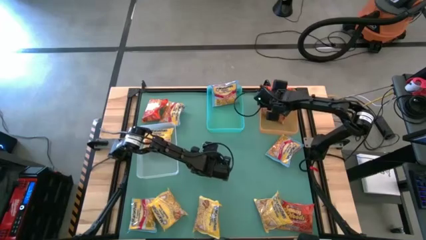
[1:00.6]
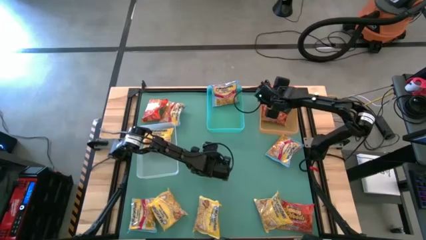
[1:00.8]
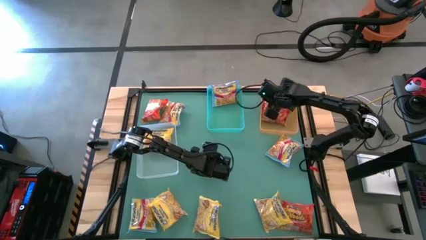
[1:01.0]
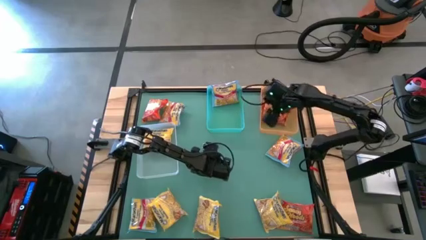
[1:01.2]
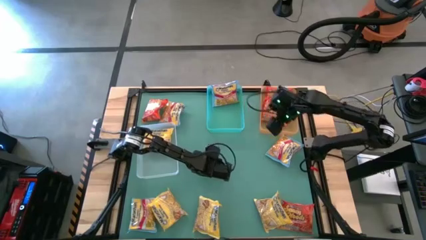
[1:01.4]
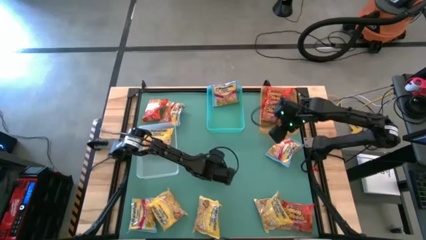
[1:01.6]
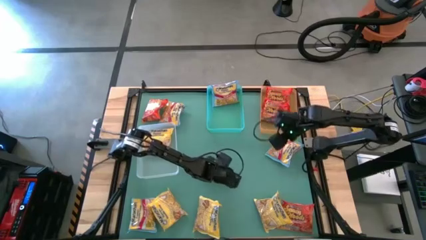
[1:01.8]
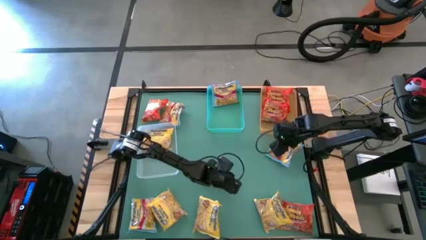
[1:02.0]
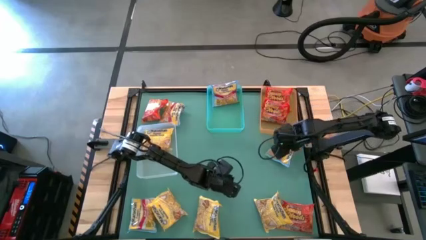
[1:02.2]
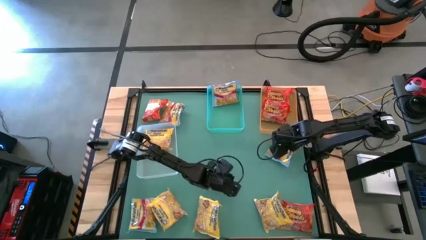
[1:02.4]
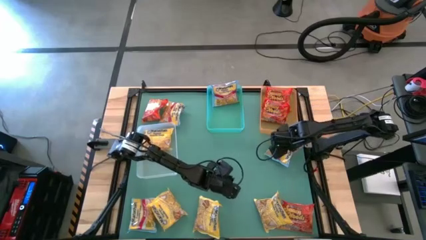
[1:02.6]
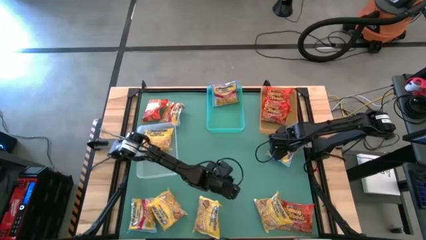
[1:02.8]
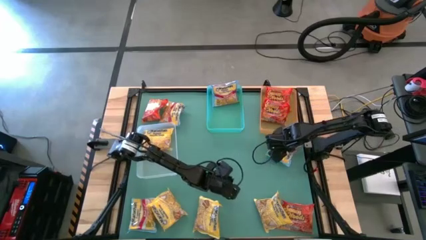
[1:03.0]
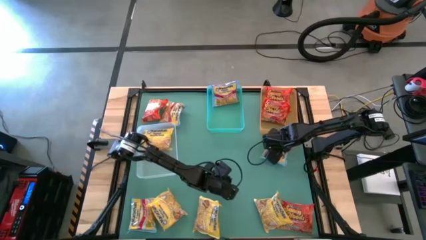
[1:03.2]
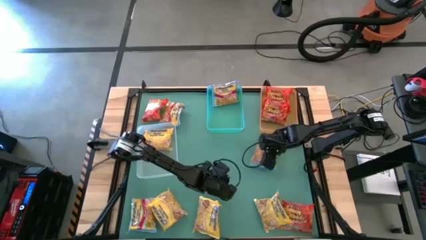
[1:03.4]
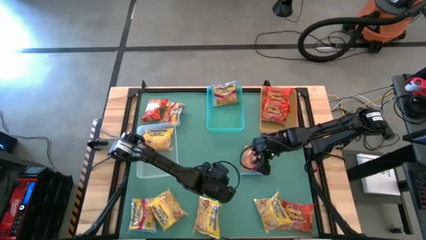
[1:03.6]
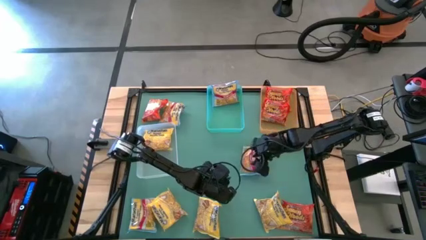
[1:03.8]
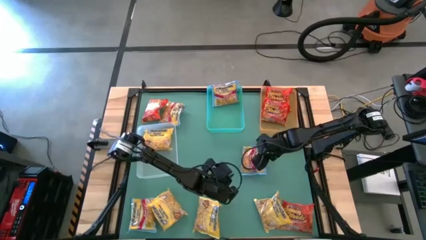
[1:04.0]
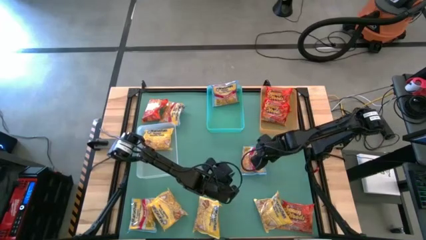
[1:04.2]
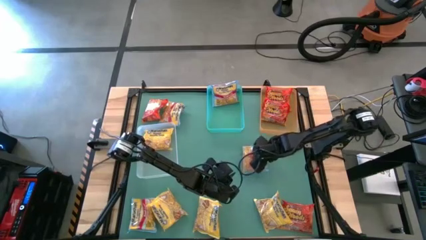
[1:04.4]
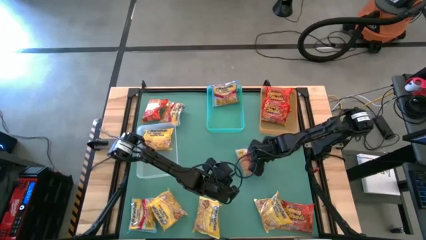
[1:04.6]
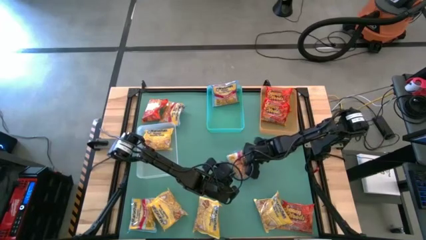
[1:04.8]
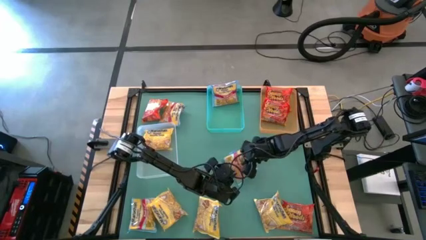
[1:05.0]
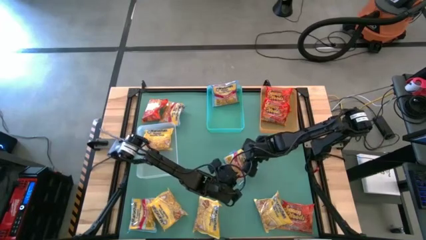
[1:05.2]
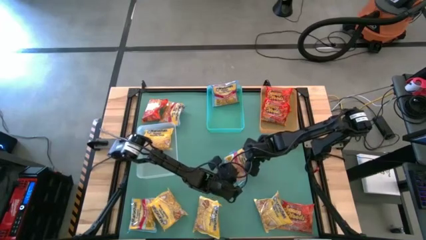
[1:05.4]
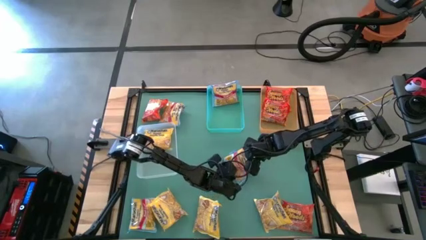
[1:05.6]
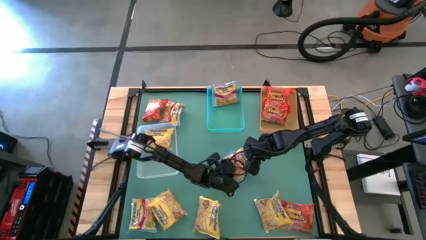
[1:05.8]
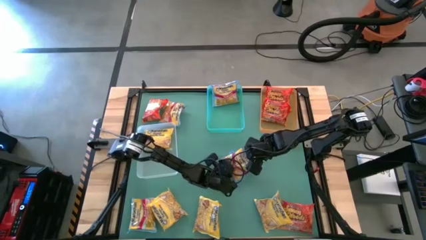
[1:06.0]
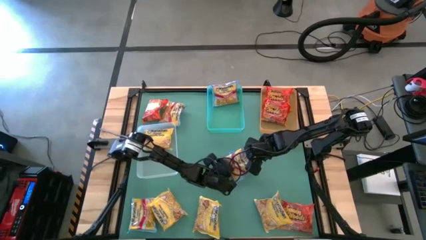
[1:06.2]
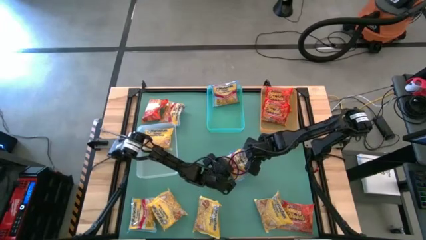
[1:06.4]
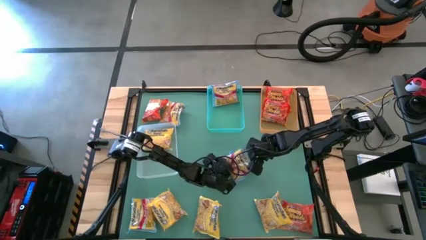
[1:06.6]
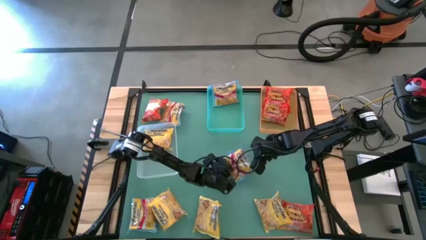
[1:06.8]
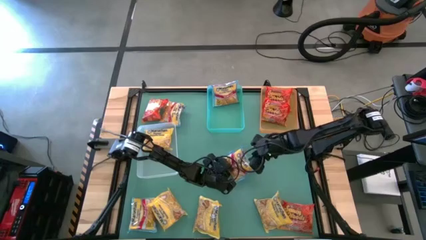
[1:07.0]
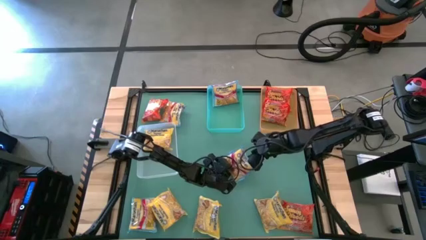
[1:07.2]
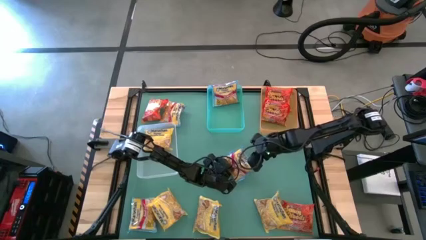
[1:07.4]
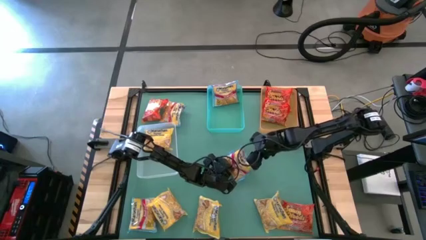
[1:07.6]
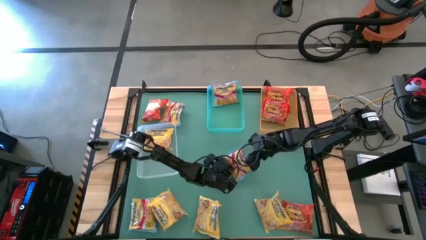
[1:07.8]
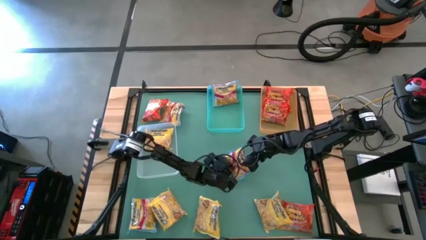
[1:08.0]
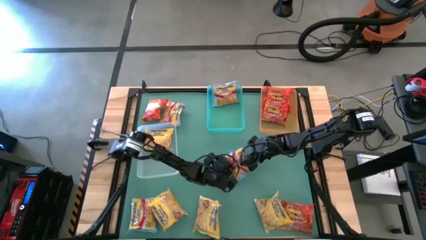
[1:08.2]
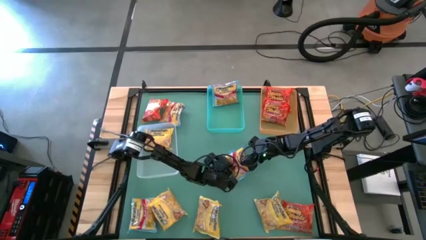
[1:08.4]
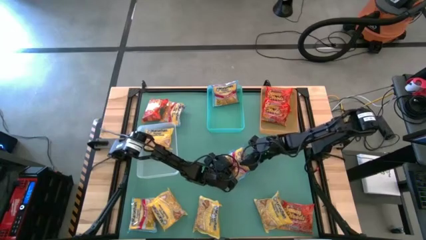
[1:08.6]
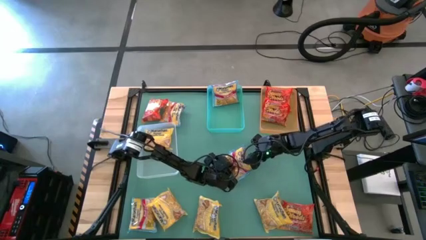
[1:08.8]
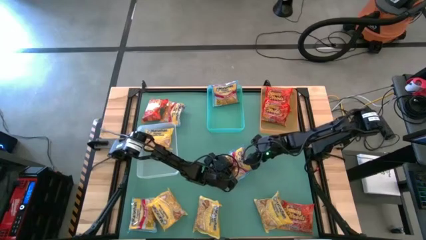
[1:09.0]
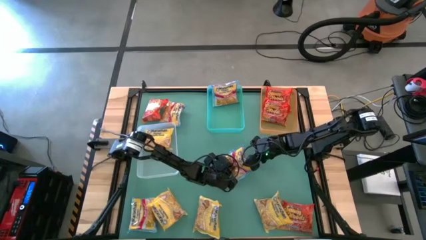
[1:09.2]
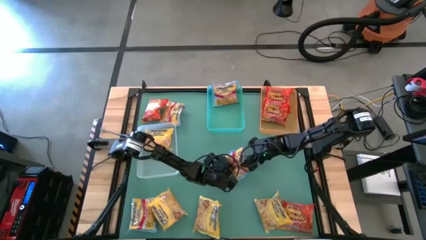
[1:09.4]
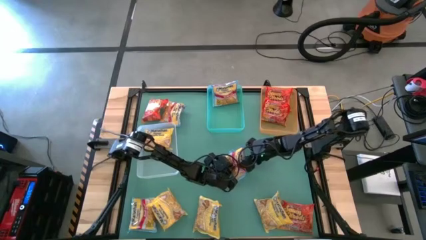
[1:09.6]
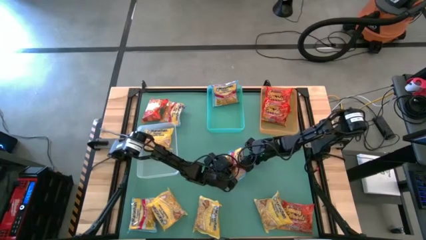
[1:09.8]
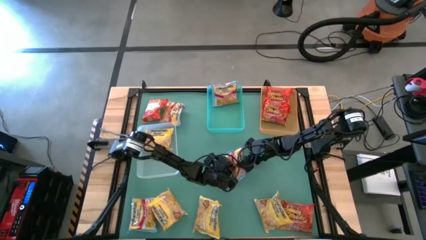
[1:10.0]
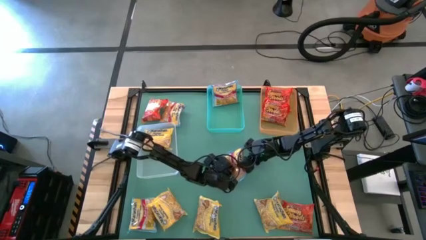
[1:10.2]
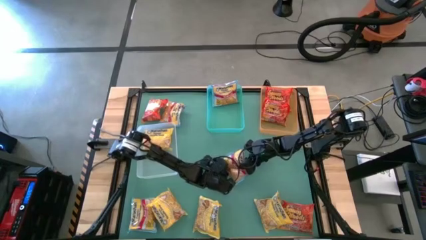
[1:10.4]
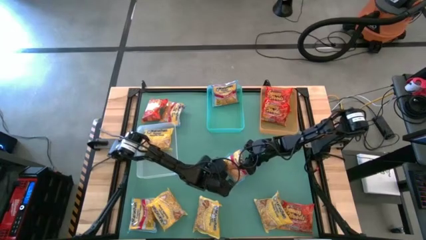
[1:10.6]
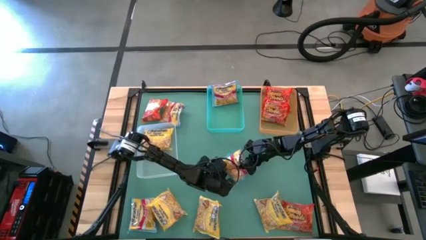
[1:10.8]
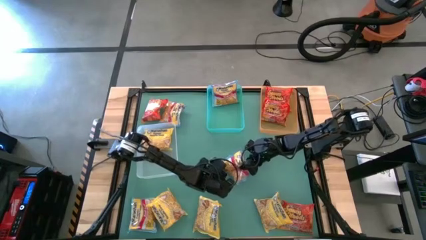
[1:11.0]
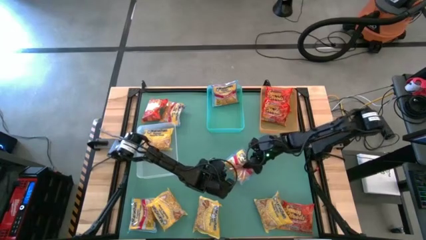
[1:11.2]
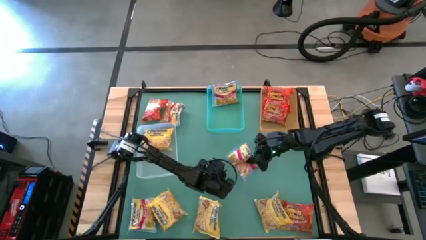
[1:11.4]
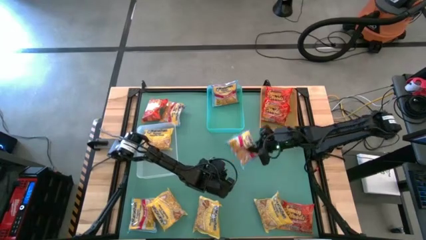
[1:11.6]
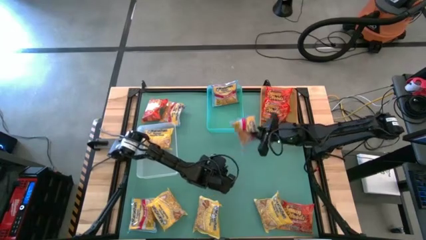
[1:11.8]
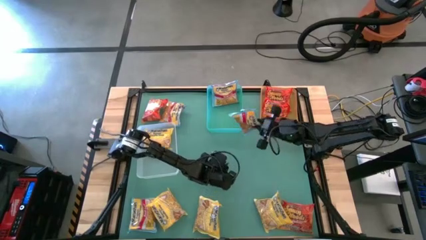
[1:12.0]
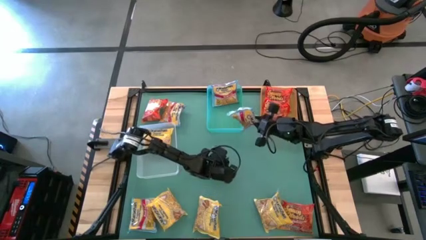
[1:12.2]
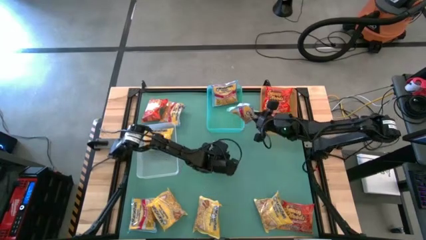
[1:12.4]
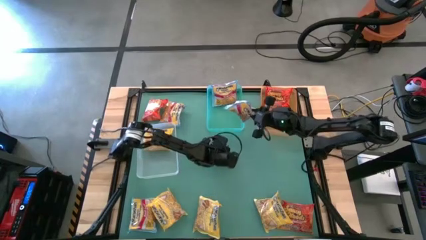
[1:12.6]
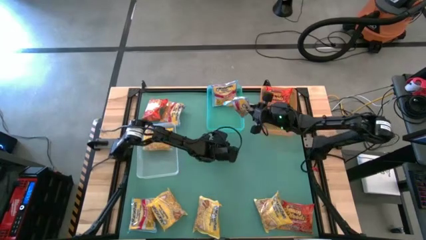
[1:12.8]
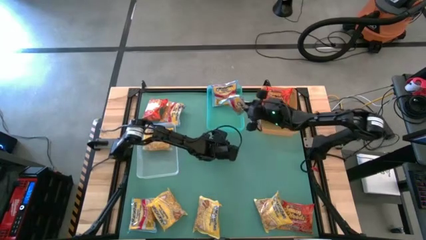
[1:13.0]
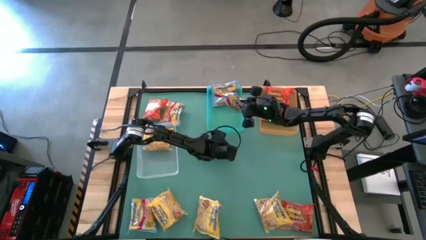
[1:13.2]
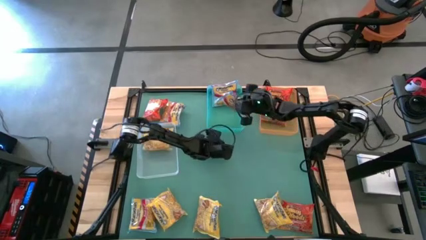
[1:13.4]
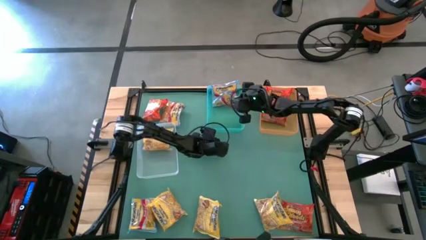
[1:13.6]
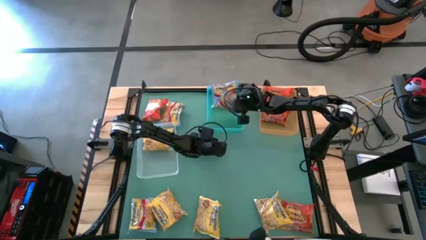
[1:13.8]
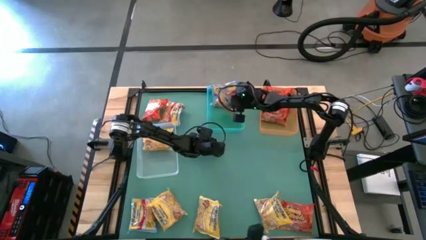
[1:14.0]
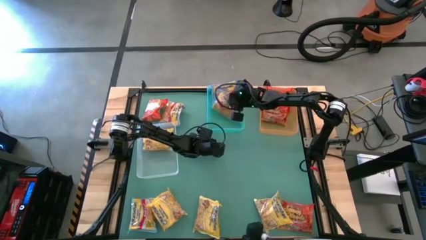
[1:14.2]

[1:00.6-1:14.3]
Task: Sort Maruchan noodles
Put the right blue noodle pack into the blue bin
